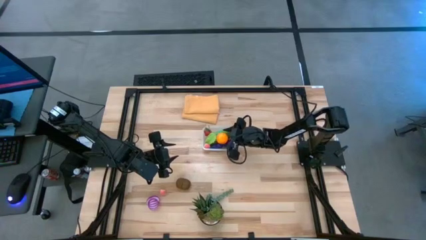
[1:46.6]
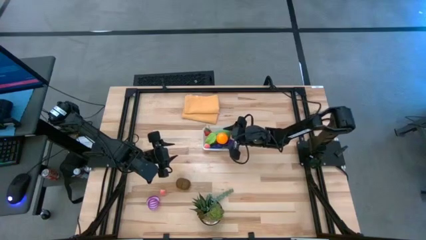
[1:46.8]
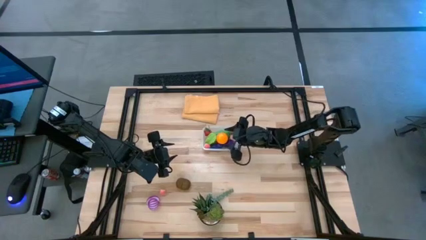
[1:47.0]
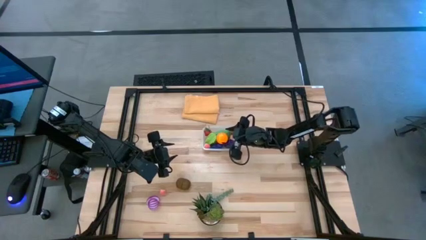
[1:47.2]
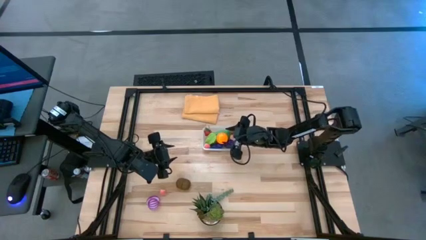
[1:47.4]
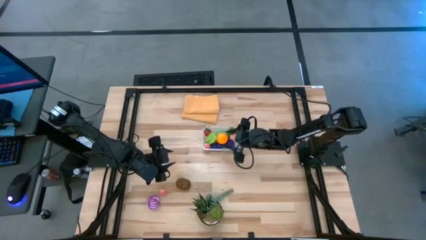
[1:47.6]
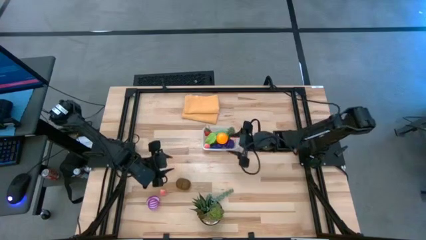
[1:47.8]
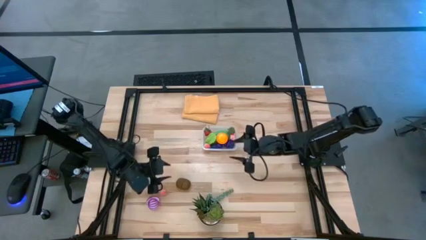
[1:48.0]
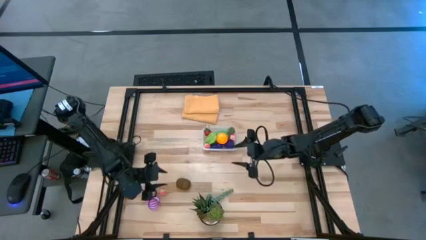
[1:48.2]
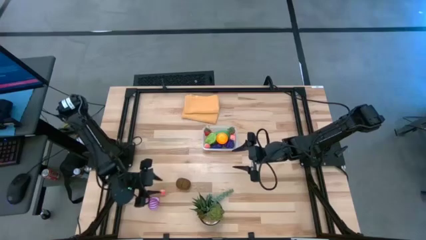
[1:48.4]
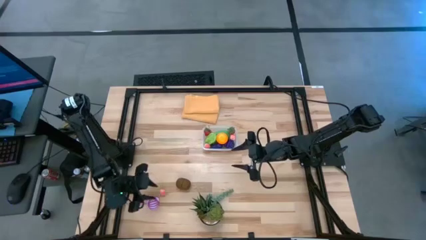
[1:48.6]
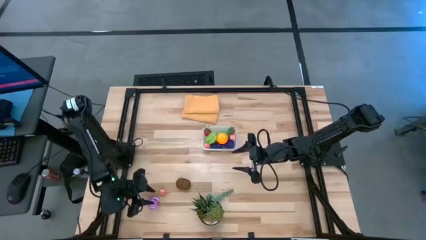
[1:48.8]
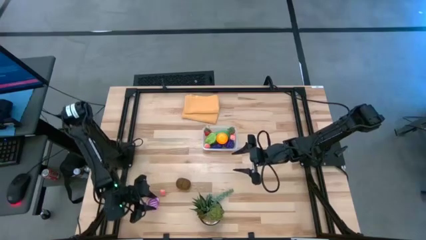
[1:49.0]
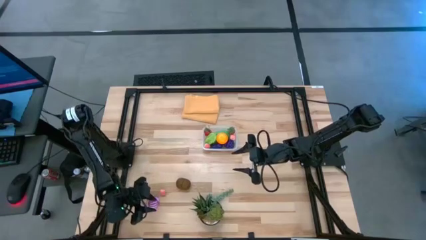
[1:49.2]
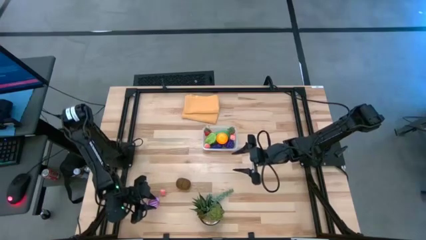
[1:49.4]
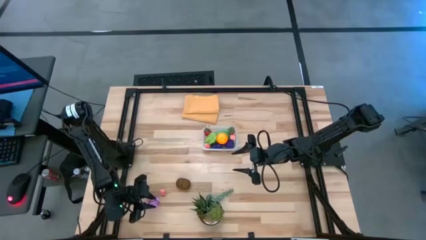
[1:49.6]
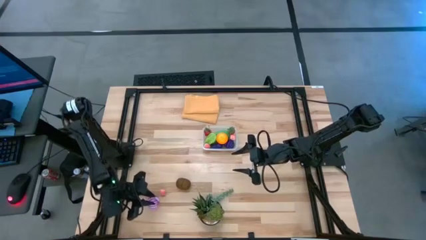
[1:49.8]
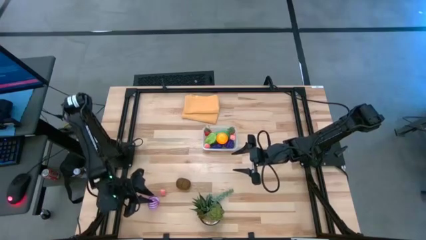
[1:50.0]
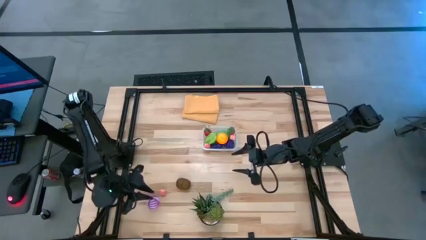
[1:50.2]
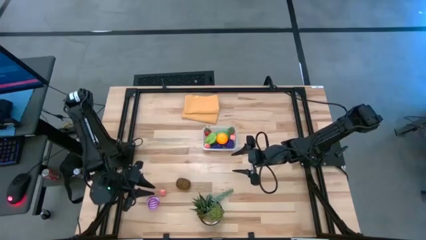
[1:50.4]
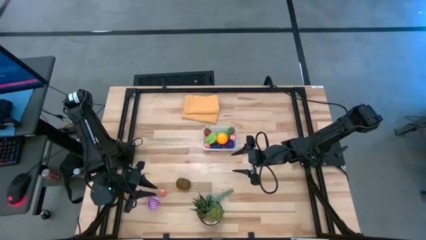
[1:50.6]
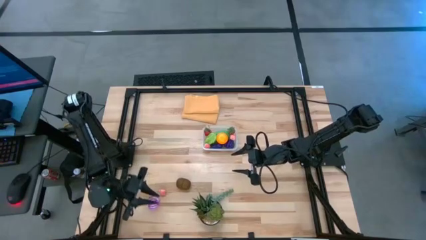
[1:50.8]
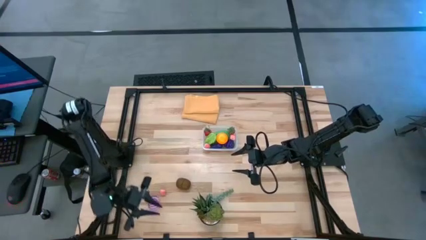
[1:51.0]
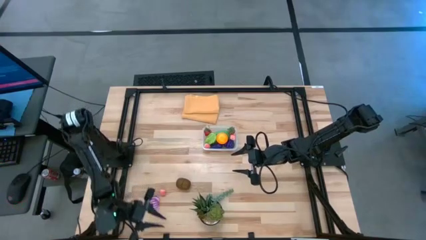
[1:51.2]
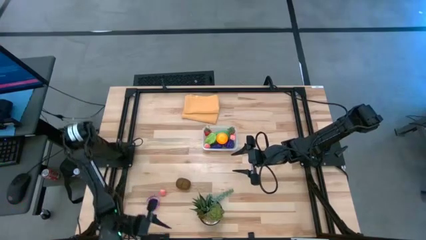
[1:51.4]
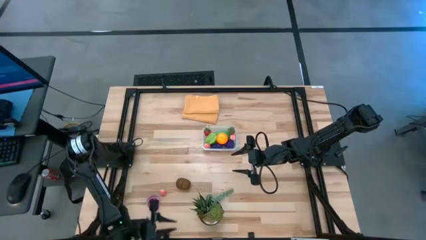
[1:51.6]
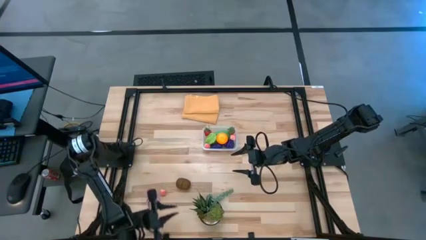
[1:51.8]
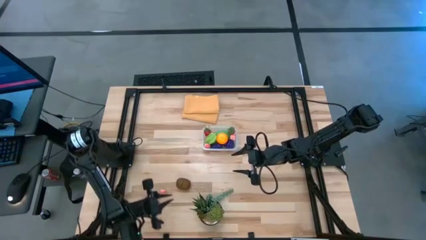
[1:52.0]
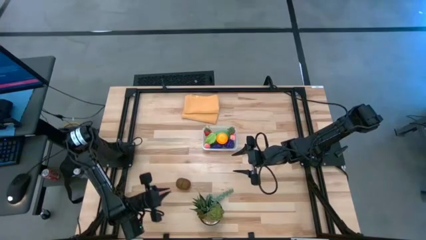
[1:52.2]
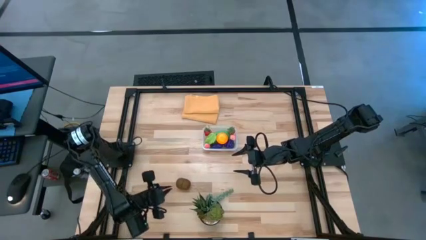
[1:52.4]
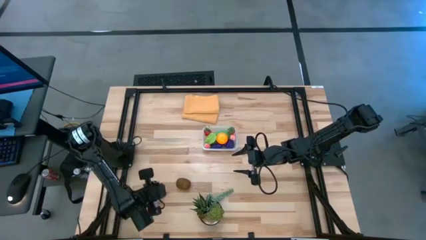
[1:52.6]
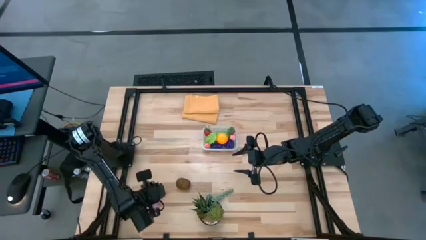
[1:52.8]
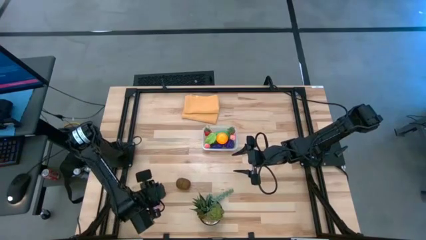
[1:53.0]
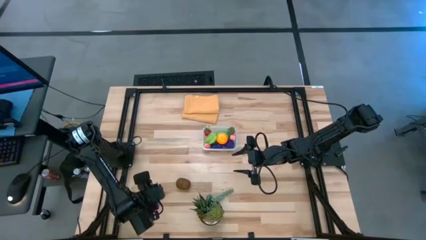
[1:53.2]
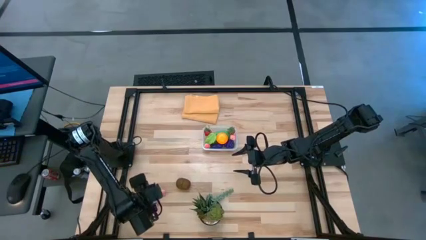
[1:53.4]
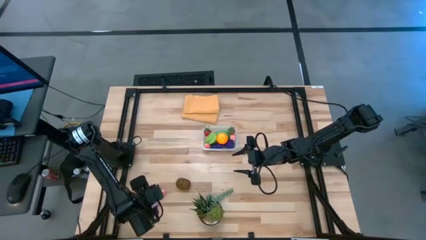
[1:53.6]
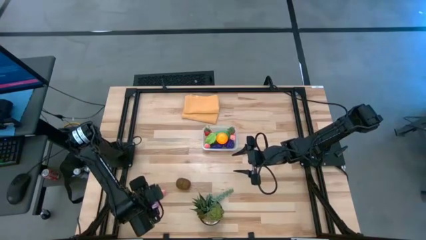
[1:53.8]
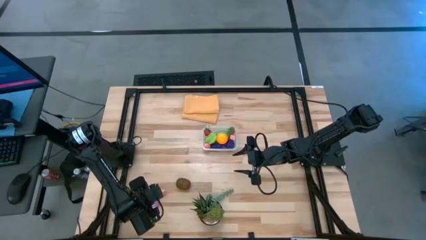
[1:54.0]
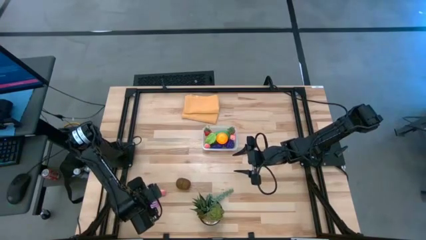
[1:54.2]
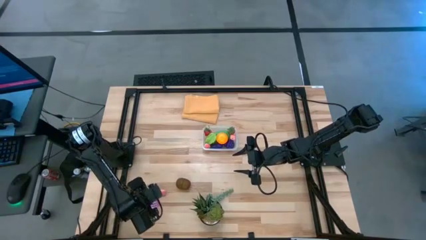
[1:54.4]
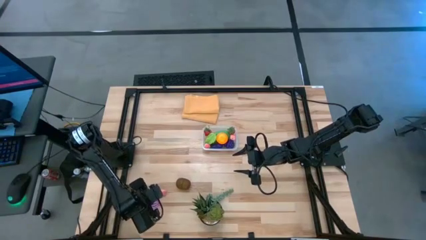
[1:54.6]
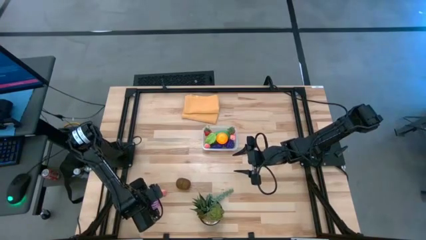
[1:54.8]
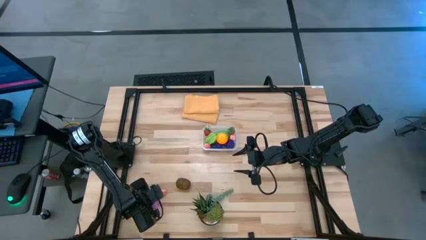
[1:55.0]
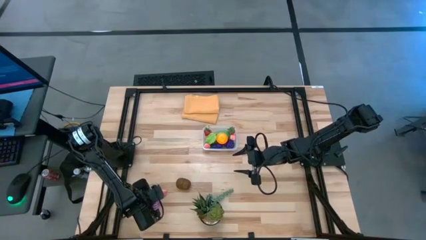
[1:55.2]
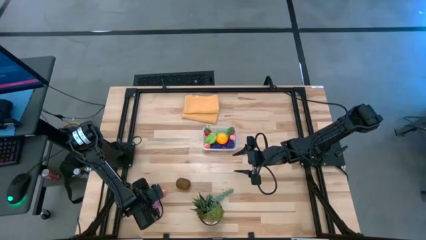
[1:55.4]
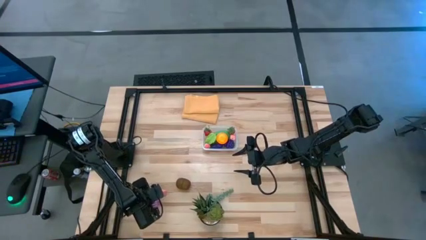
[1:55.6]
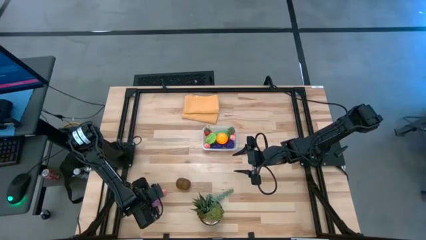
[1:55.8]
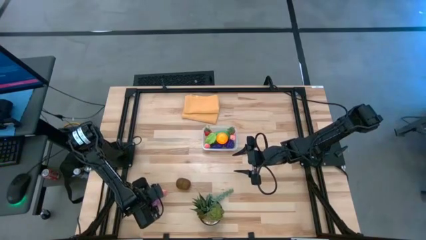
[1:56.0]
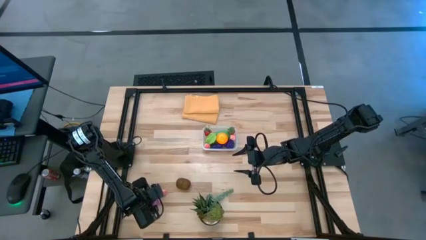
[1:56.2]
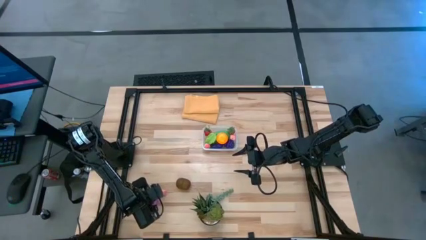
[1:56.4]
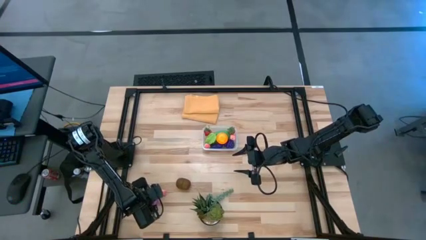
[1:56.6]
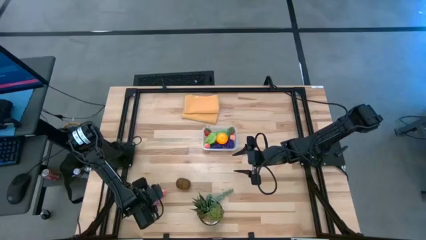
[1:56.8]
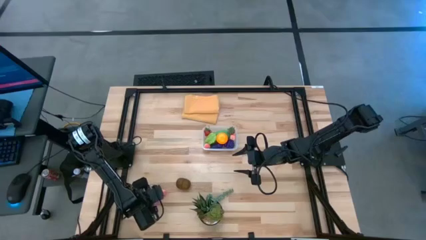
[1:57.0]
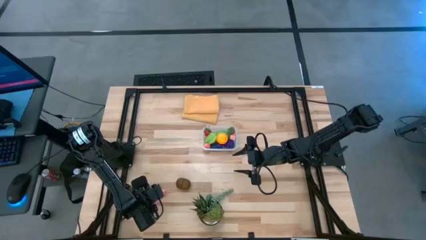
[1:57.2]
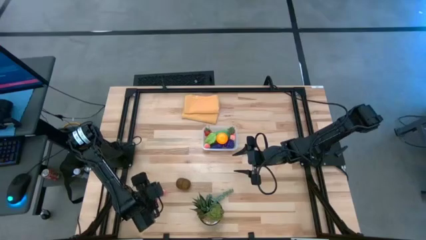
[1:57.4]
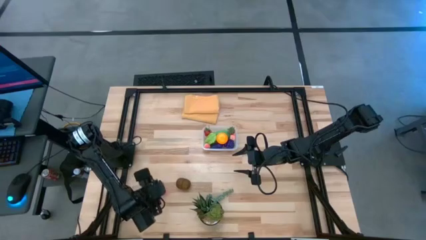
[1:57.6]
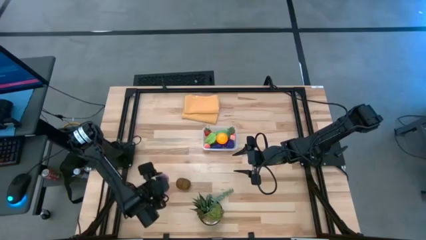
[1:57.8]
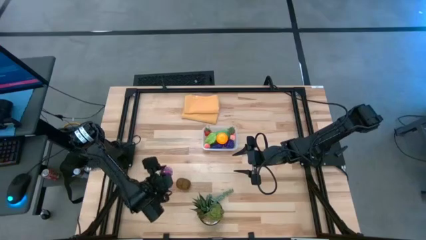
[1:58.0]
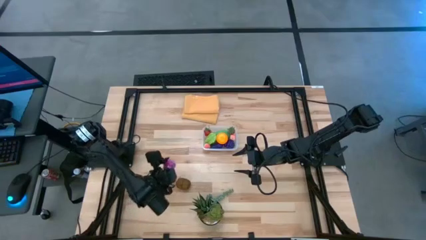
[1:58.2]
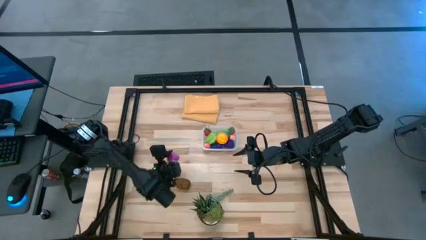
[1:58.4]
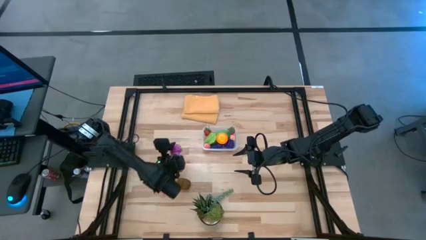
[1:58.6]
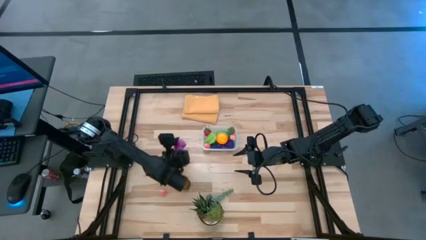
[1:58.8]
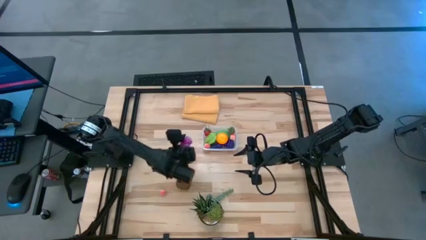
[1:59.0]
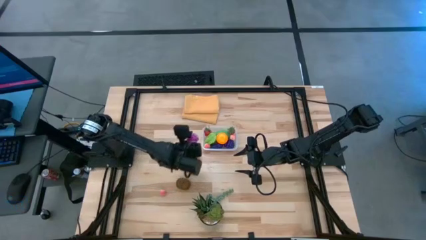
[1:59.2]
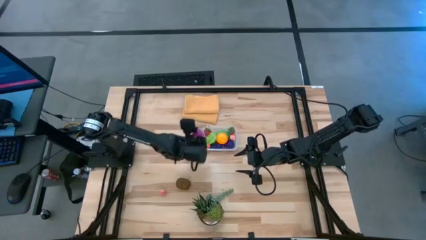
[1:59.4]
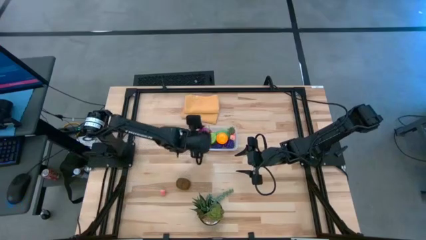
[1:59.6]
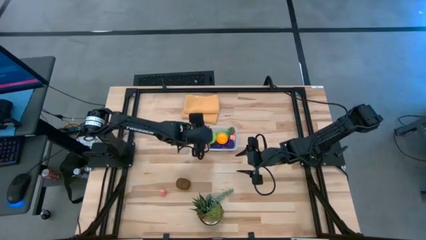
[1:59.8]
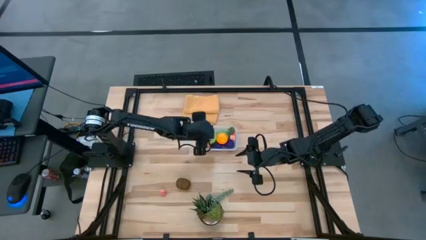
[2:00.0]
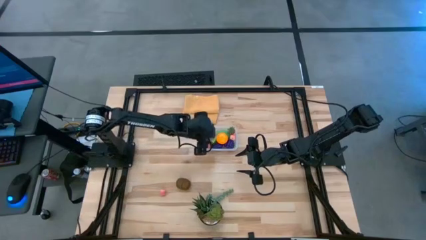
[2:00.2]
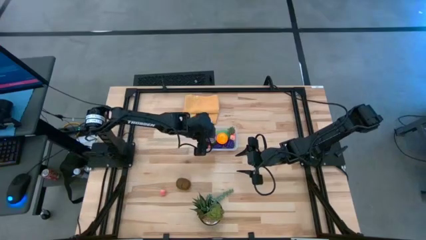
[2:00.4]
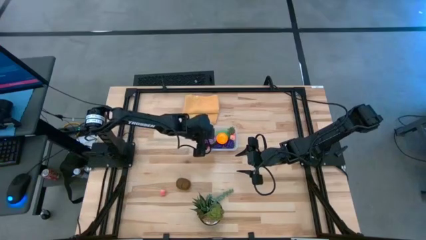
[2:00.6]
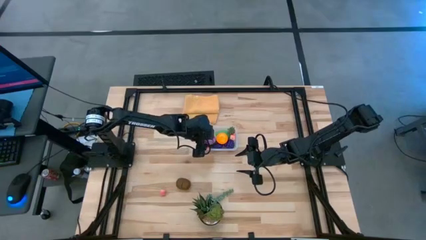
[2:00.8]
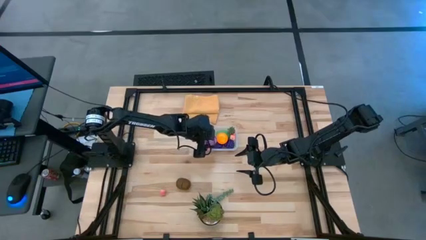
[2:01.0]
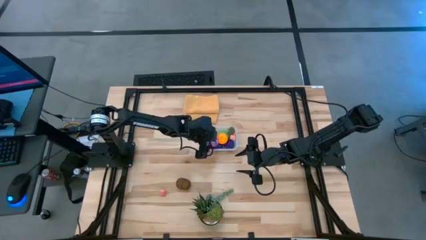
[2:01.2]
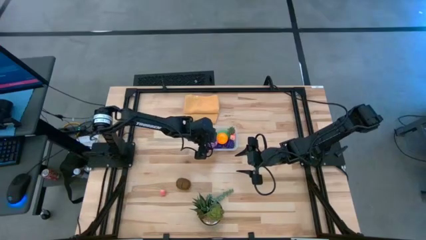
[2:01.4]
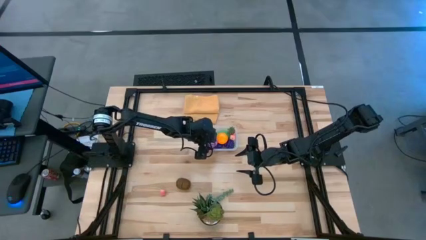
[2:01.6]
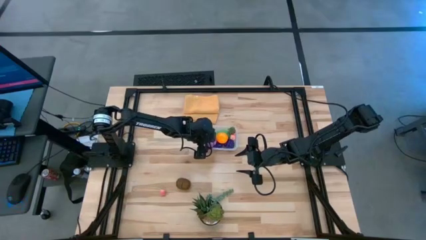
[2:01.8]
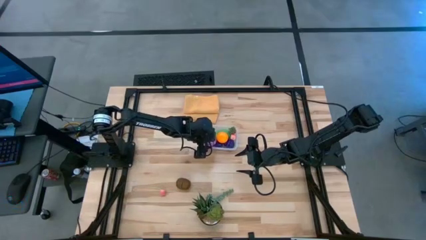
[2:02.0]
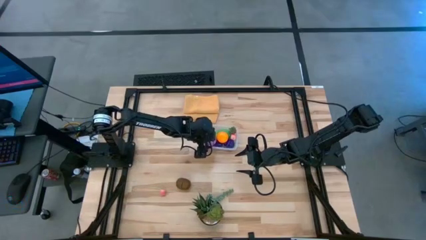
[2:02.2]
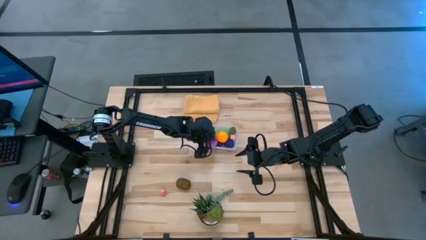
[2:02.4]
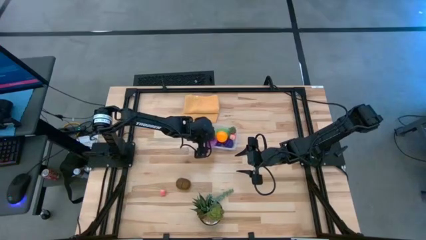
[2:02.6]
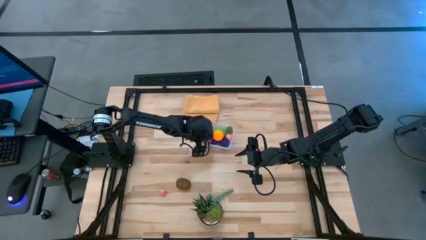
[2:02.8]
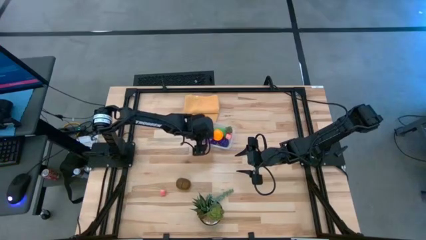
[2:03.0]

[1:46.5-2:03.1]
Task: Pick and placing Produce into tupperware
Put the purple onion into the transparent container
